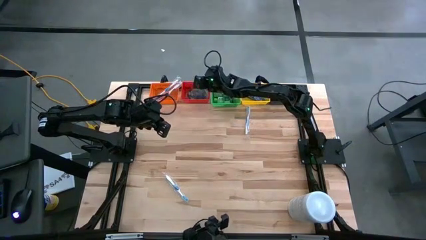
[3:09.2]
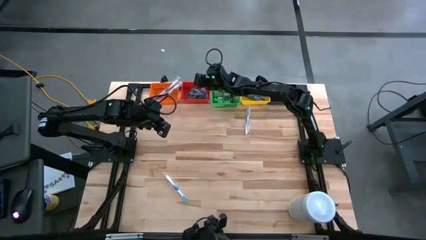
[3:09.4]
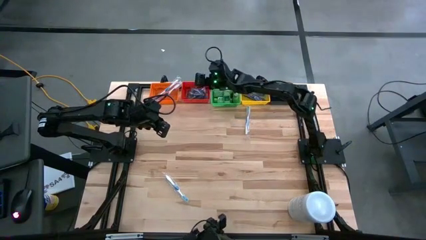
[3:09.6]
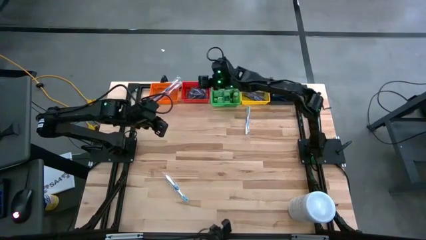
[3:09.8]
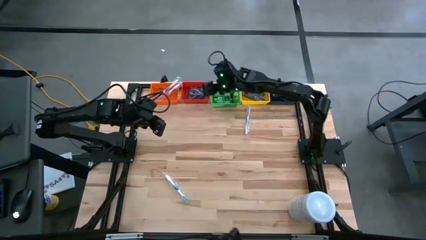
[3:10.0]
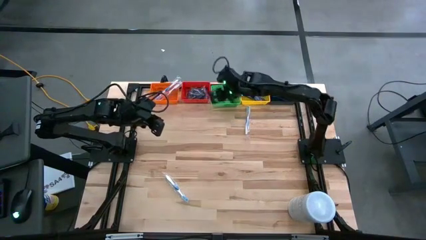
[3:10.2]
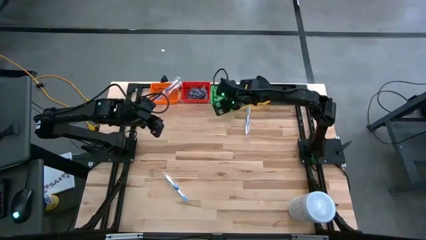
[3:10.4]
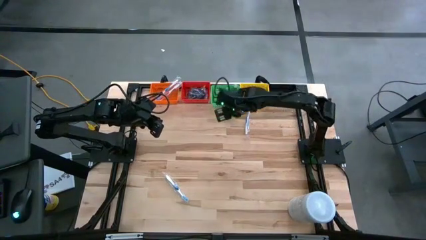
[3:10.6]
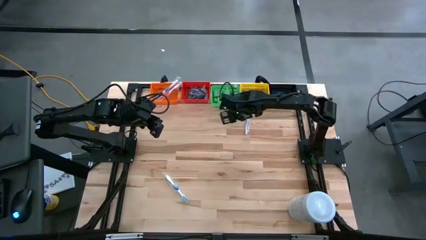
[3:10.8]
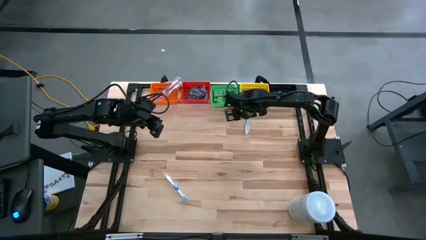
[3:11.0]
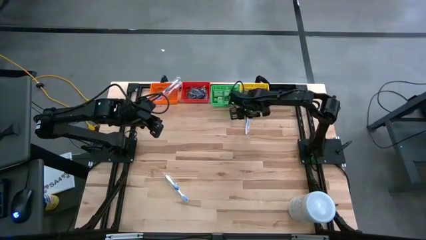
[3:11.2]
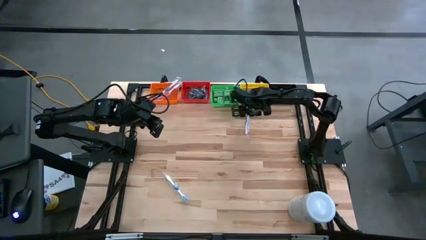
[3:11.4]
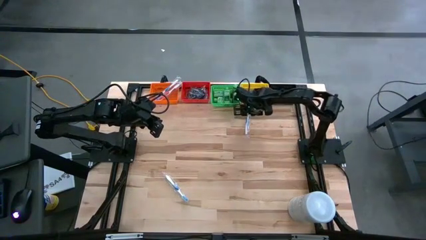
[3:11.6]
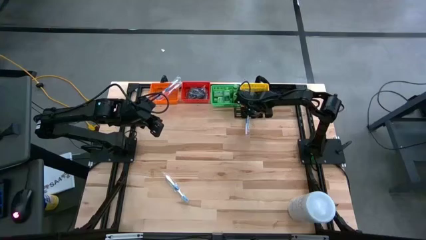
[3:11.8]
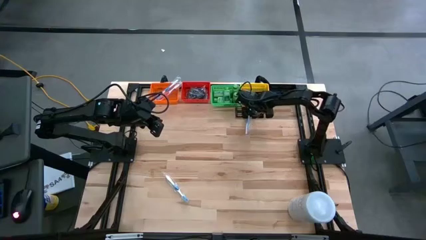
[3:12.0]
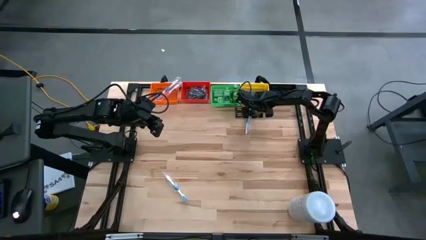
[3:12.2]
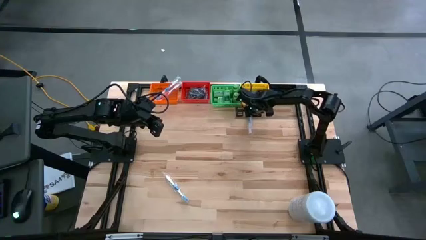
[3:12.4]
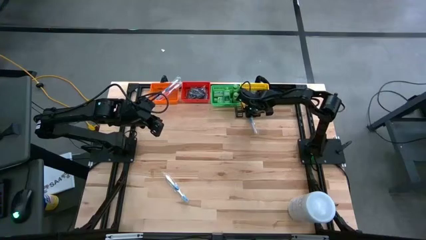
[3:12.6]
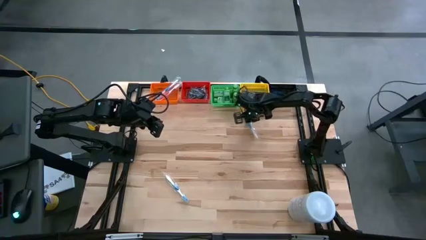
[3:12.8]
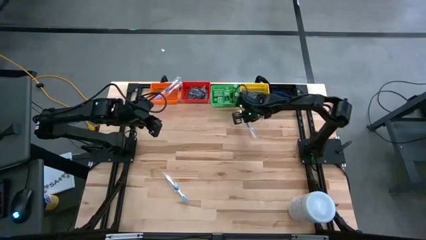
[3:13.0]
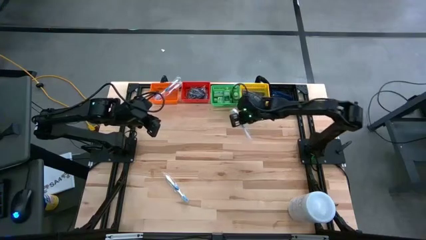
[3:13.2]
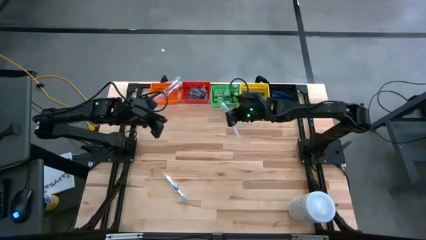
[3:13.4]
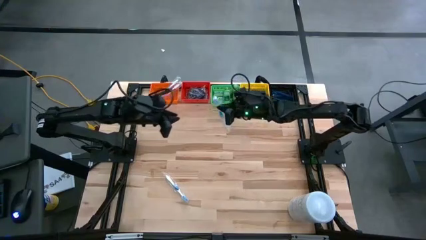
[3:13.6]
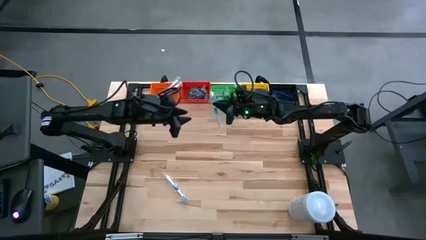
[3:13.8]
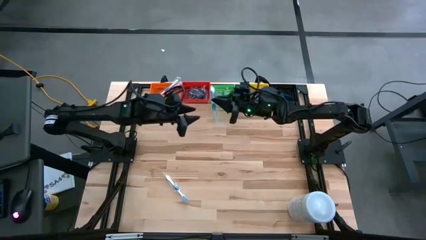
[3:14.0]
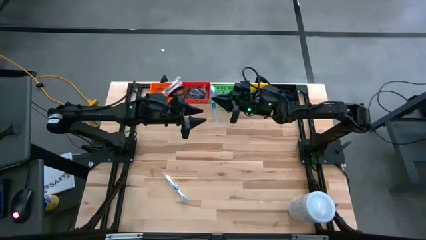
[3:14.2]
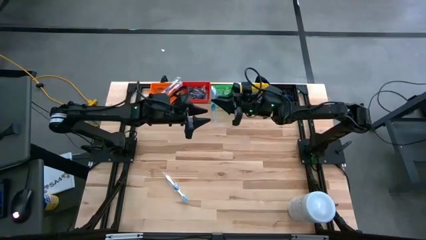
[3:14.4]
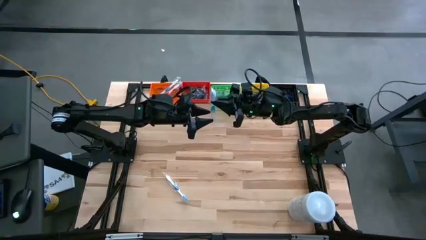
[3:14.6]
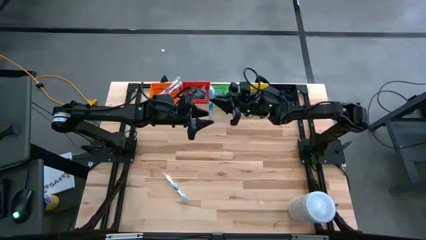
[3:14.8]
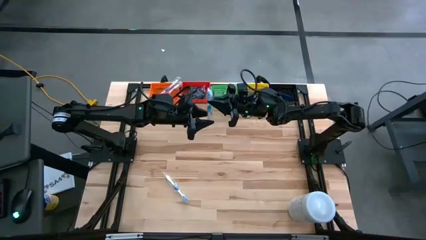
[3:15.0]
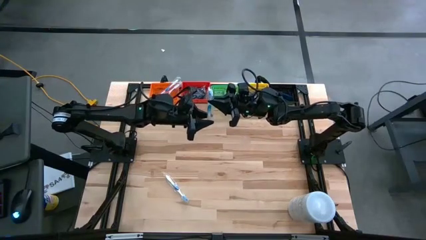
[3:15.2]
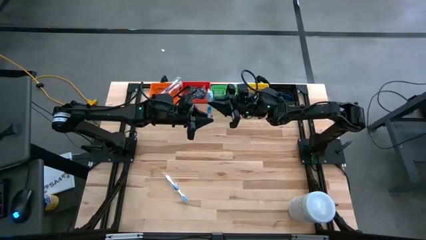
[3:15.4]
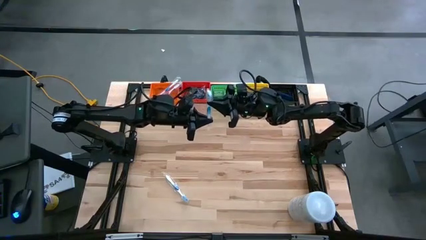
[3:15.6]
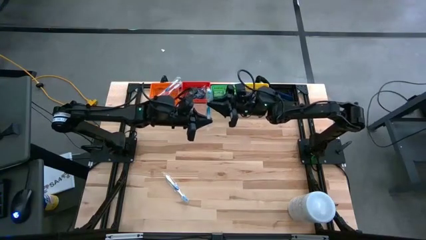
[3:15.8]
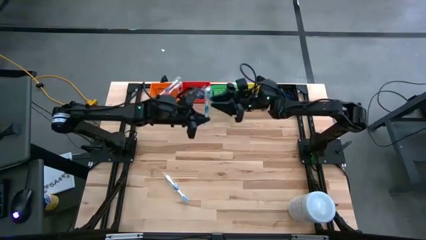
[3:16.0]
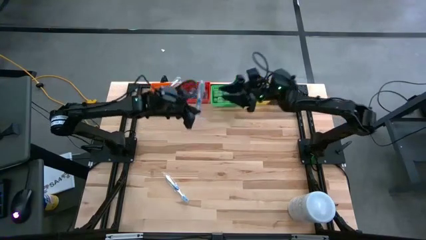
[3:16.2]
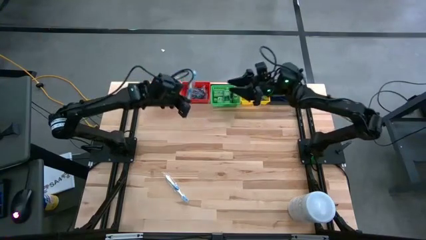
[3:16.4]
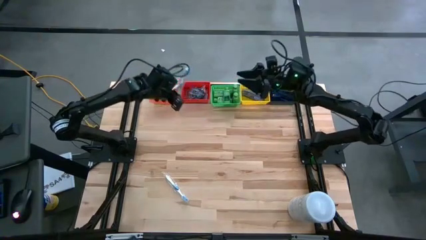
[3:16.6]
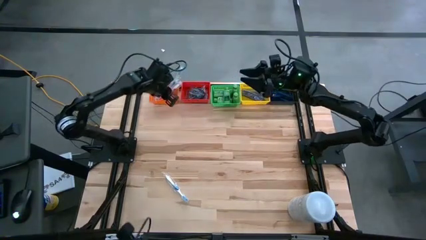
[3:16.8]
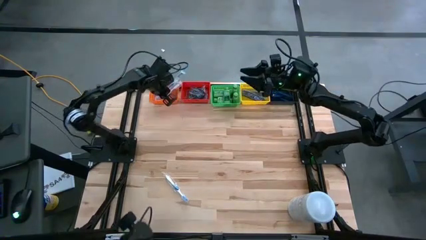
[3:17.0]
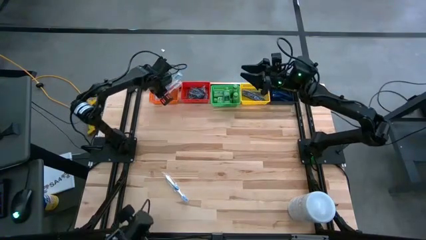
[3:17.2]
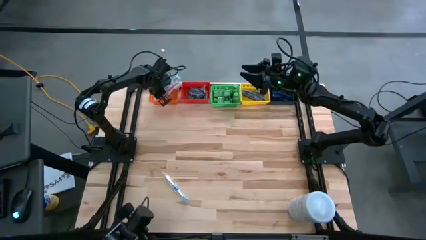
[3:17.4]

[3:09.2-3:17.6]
Task: Pick & Place Travel size toiletries
Put the blue toothbrush into the orange bin

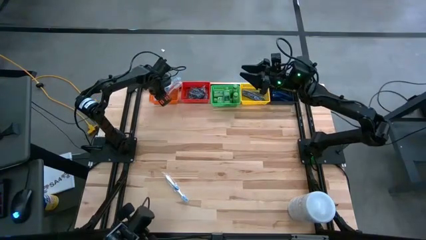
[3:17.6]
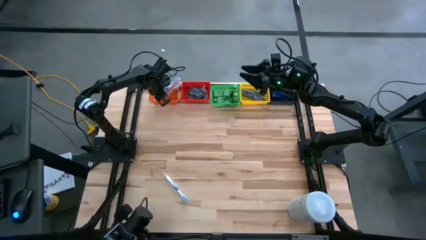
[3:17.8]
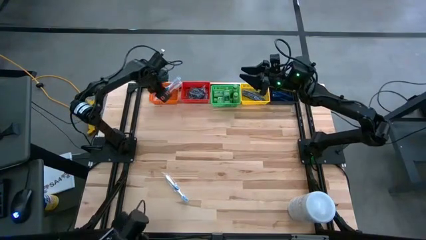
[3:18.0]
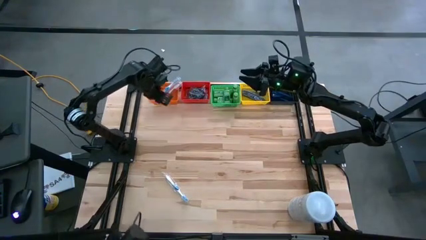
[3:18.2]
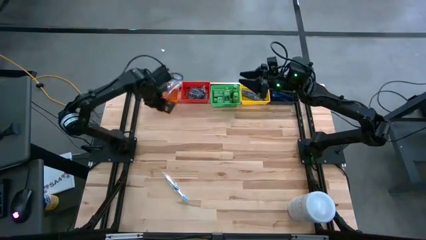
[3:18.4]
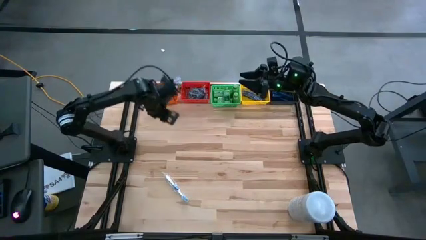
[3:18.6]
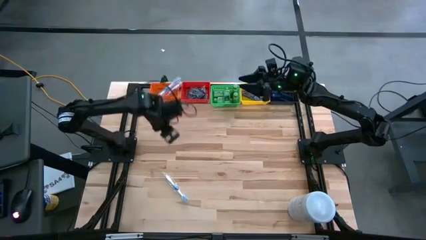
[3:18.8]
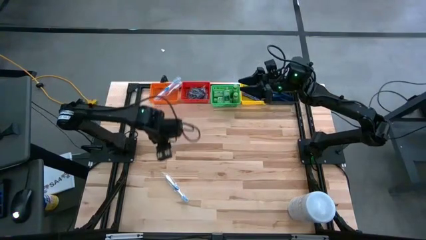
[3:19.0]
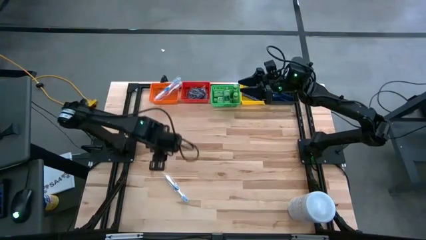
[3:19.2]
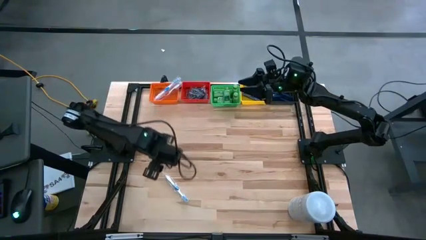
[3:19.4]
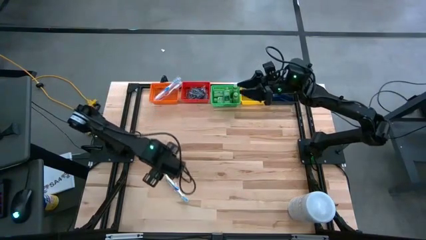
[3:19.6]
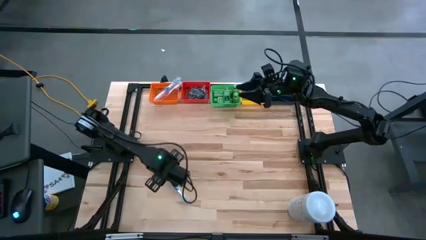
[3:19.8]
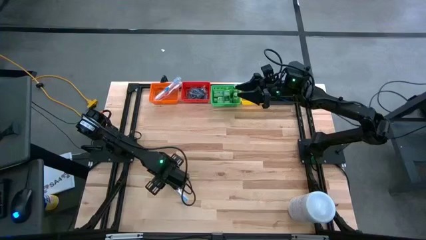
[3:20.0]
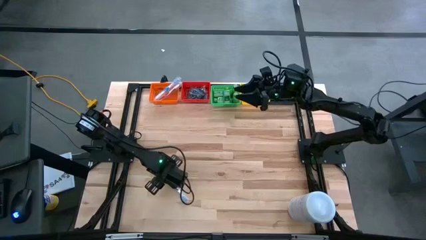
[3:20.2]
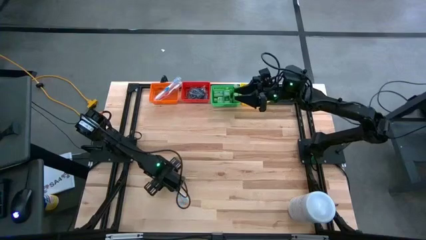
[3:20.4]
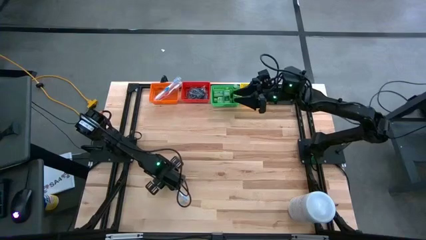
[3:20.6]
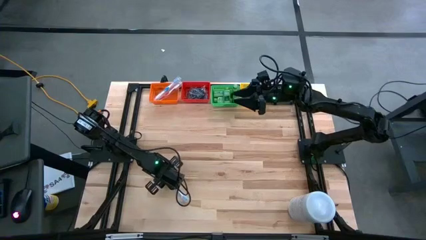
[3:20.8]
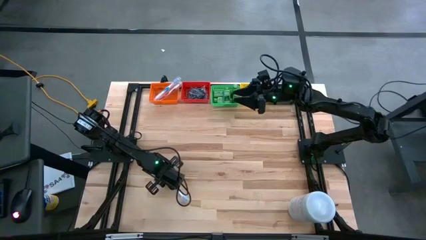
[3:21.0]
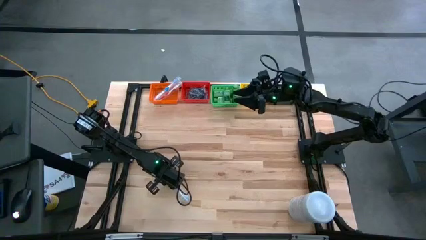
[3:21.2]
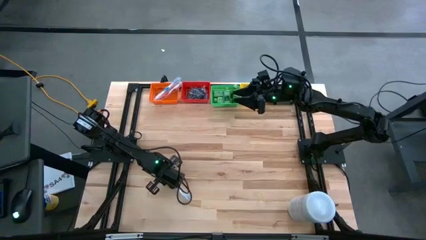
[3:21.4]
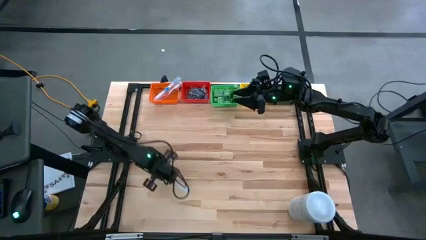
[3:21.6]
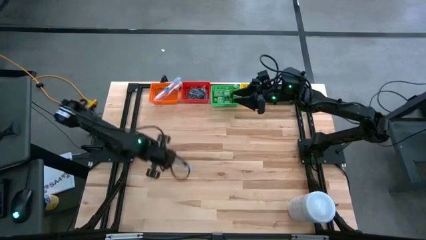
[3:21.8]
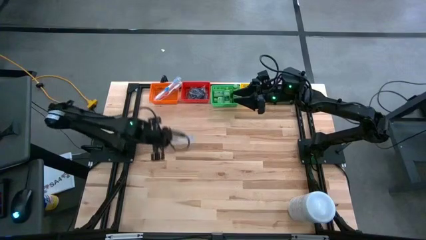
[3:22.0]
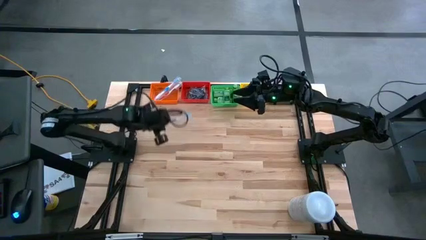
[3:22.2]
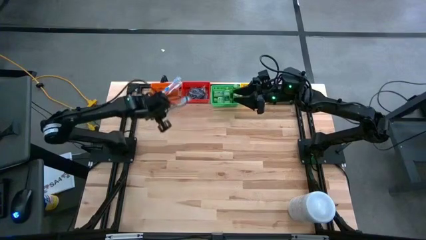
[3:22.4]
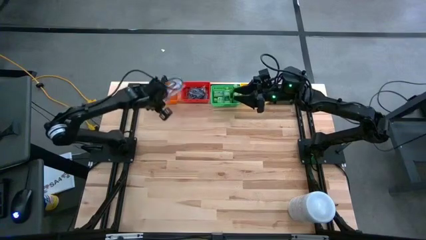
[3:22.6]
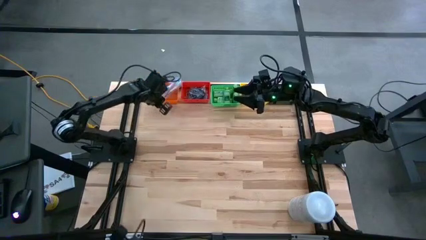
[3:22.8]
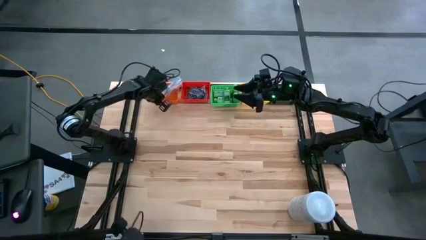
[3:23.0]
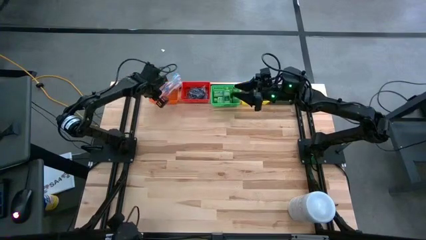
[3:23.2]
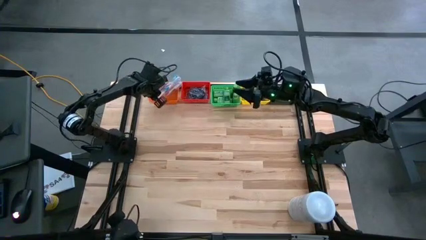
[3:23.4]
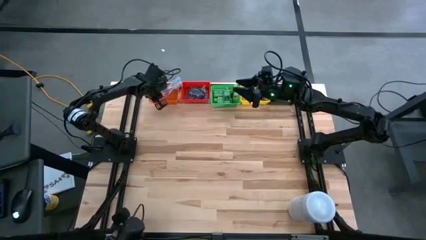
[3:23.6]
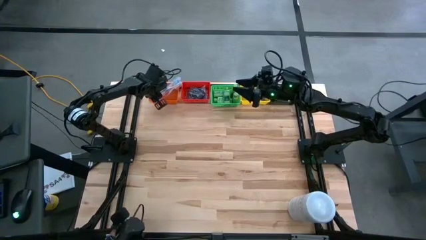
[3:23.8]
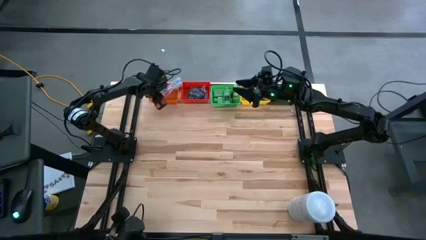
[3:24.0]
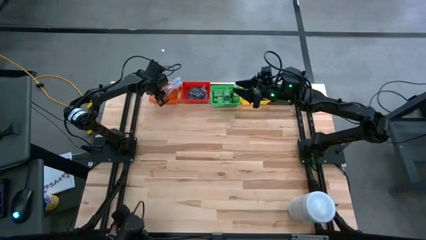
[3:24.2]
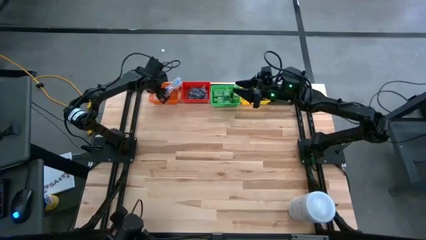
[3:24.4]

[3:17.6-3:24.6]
Put the dark blue toothbrush into the orange bin

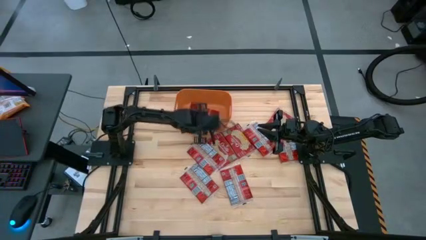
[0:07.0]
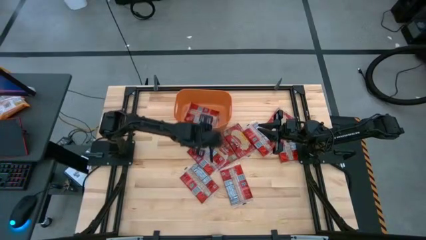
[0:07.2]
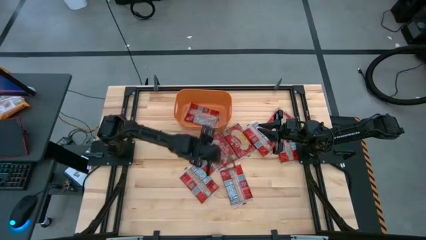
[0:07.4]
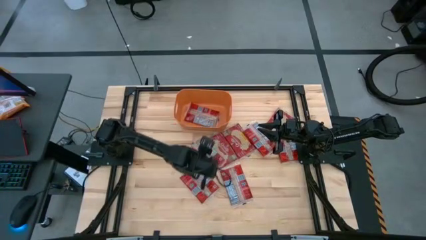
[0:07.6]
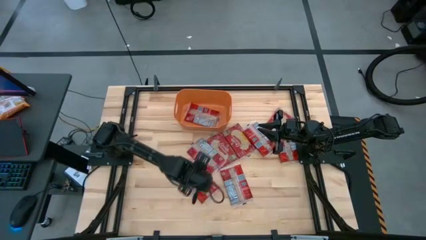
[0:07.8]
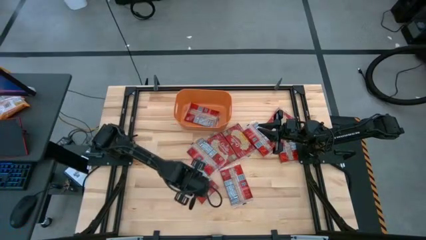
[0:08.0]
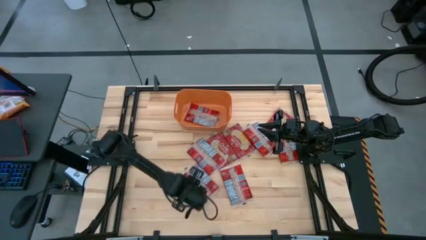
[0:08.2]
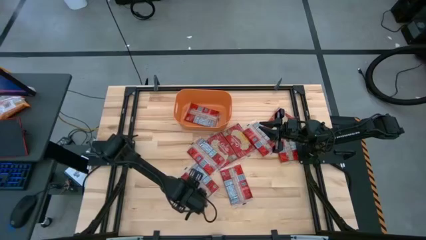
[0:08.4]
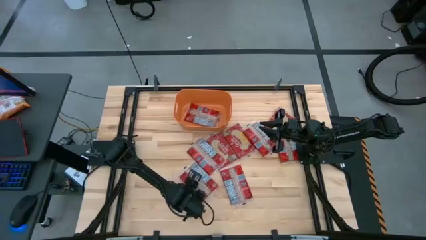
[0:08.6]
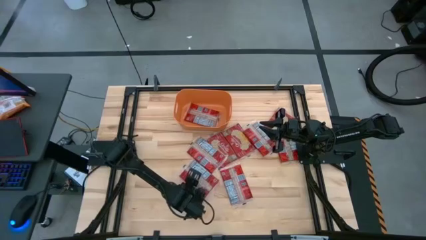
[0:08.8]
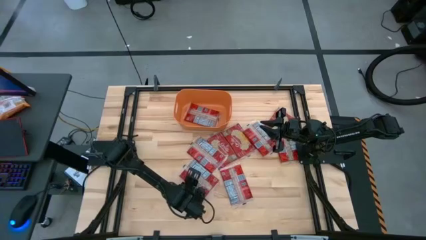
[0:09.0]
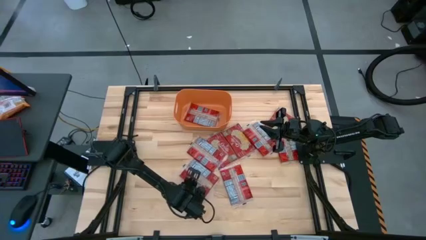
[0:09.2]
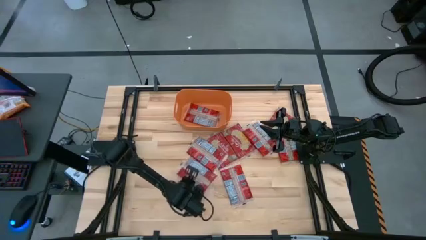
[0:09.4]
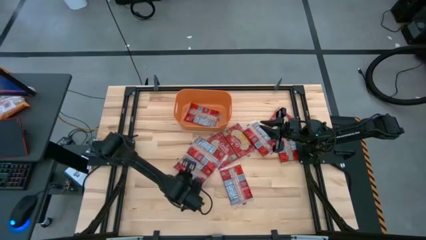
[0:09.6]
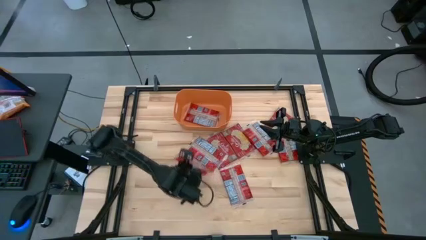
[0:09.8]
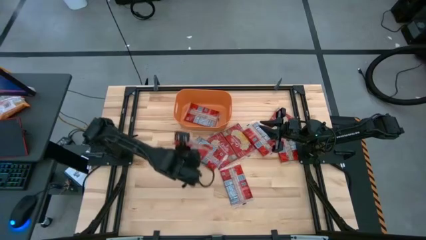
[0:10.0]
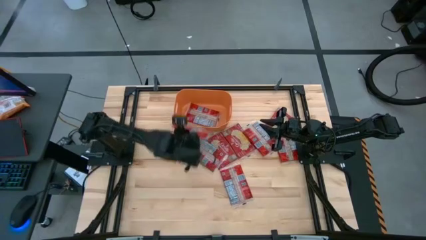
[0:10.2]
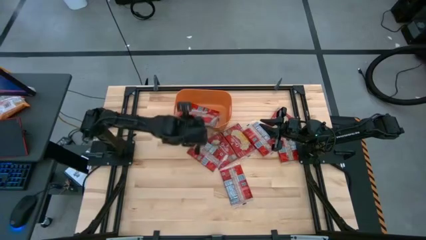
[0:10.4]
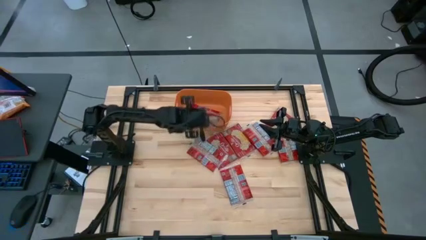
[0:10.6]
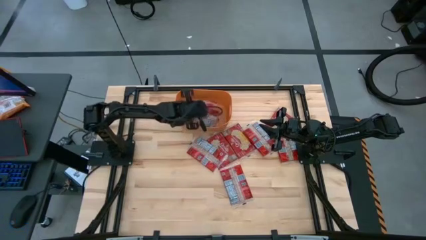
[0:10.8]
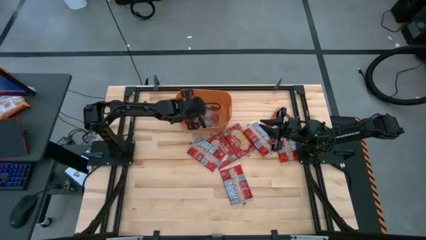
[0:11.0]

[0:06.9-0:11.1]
Task: Sort popcorn bags into baskets
Put the red popcorn bag into the orange bin
